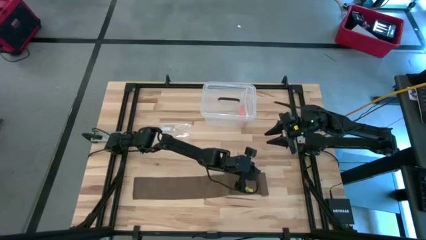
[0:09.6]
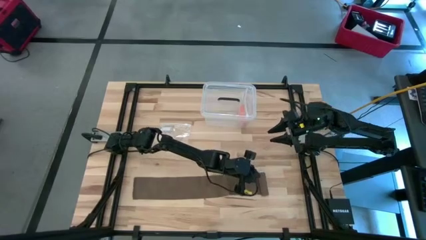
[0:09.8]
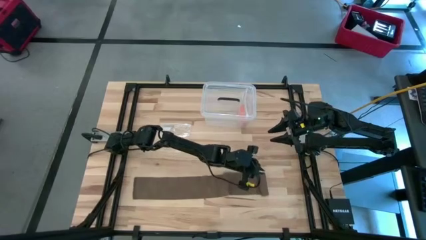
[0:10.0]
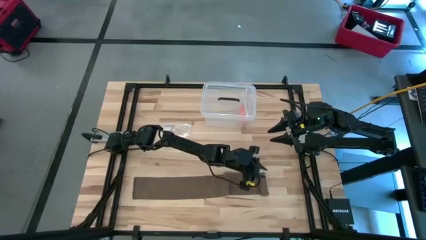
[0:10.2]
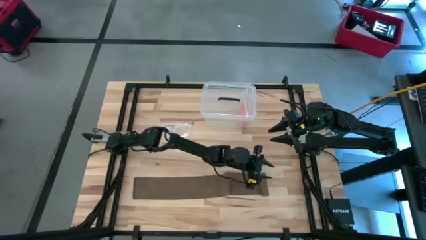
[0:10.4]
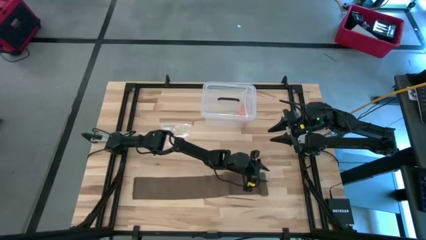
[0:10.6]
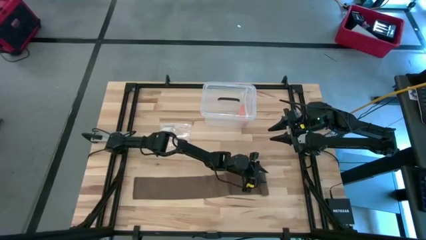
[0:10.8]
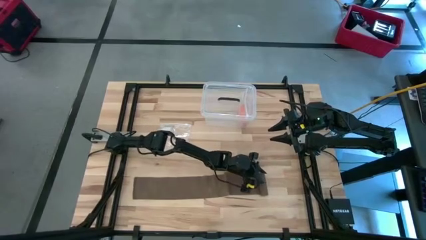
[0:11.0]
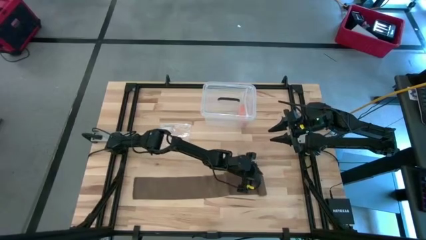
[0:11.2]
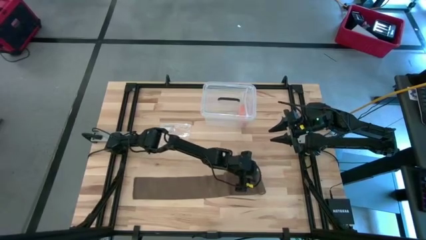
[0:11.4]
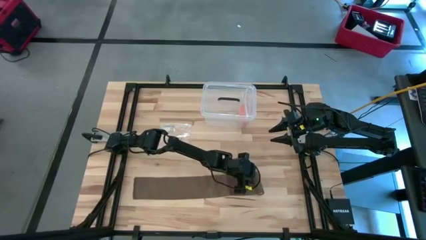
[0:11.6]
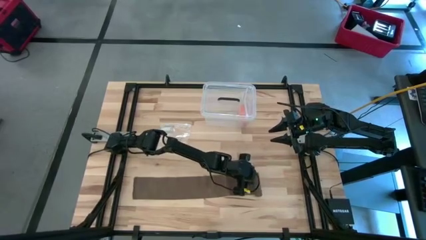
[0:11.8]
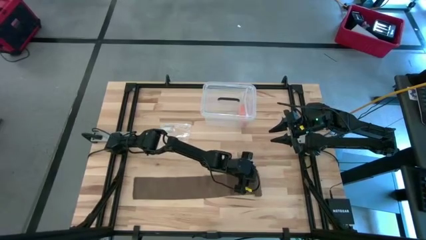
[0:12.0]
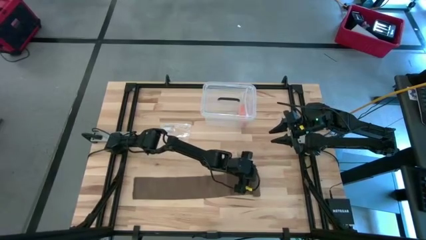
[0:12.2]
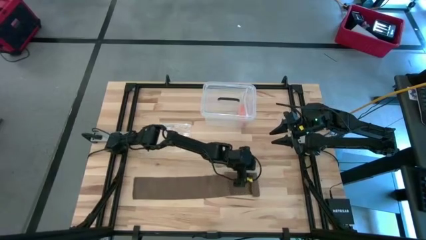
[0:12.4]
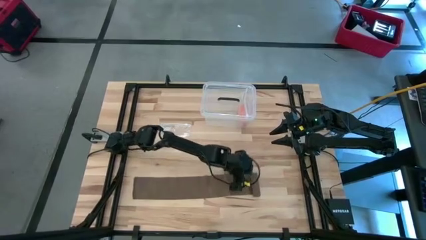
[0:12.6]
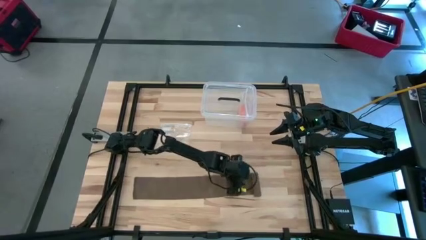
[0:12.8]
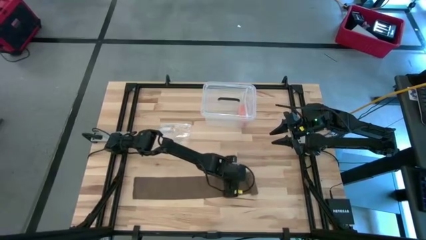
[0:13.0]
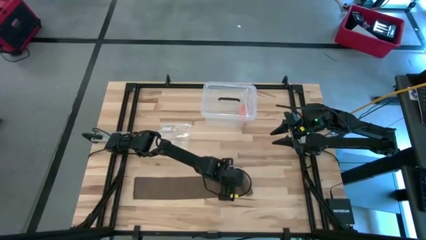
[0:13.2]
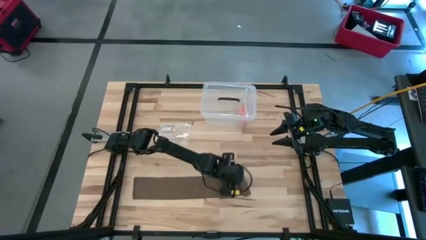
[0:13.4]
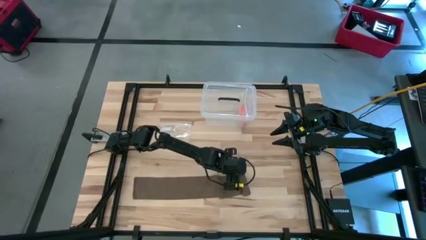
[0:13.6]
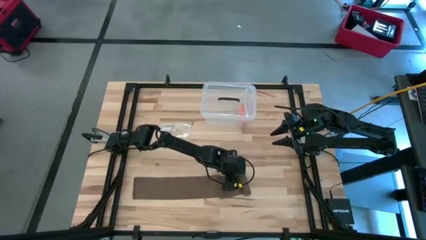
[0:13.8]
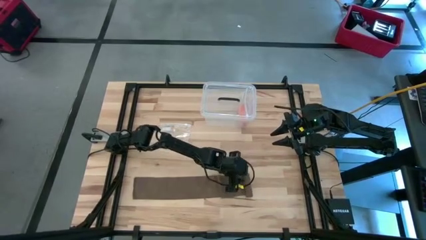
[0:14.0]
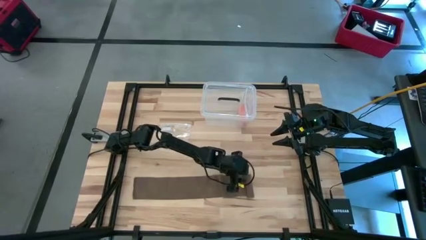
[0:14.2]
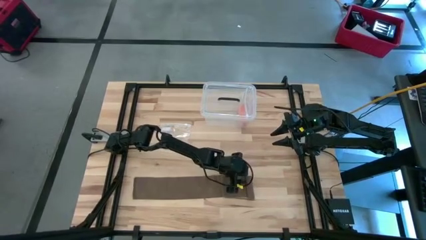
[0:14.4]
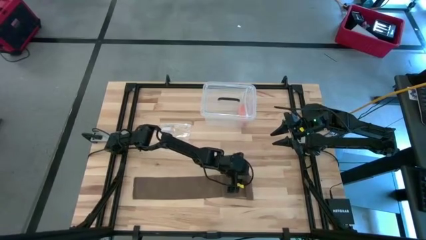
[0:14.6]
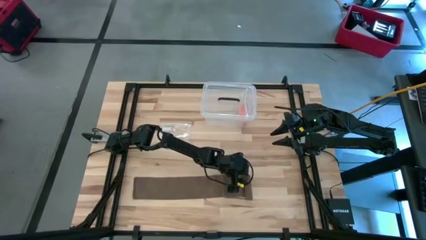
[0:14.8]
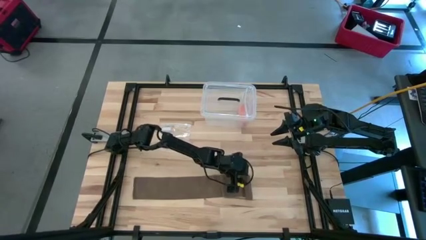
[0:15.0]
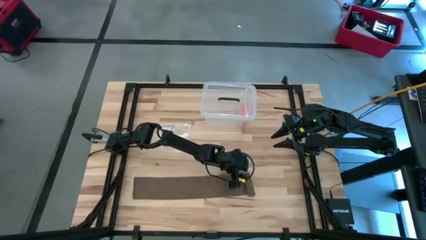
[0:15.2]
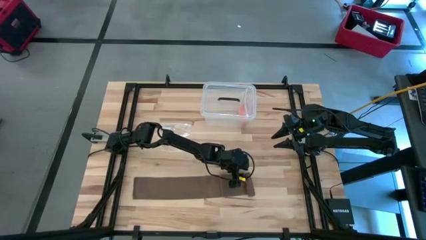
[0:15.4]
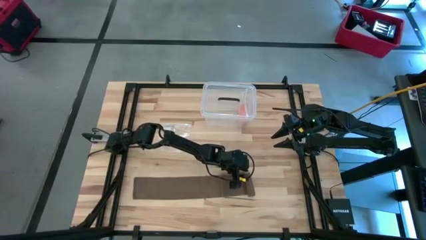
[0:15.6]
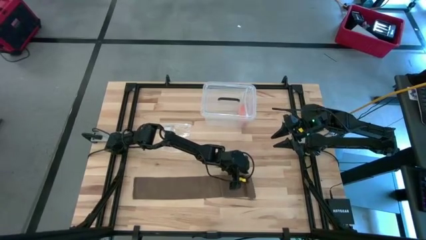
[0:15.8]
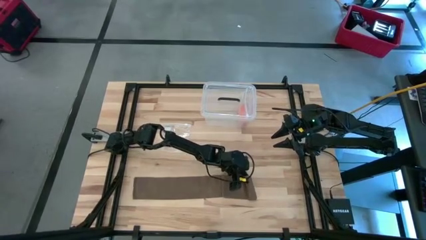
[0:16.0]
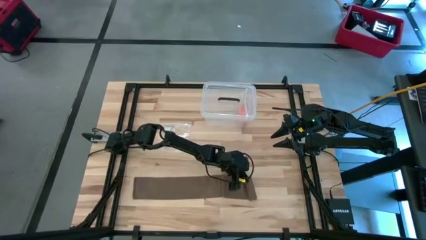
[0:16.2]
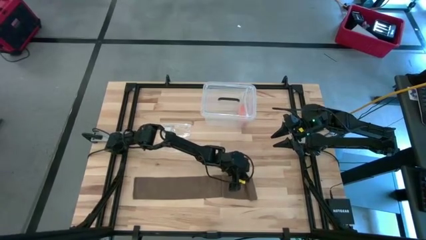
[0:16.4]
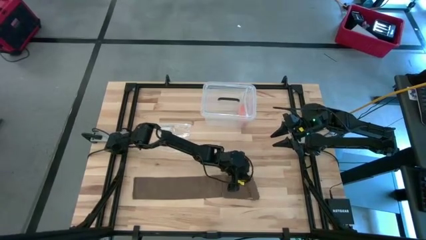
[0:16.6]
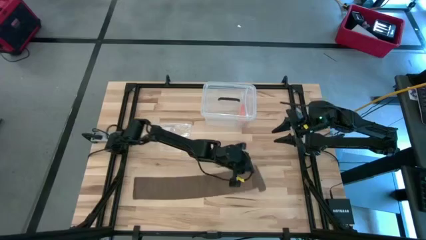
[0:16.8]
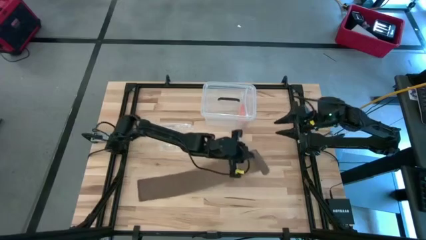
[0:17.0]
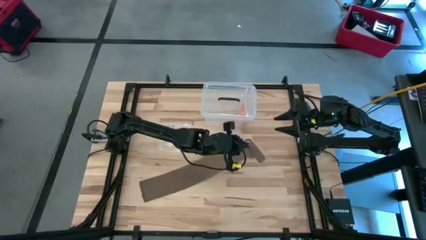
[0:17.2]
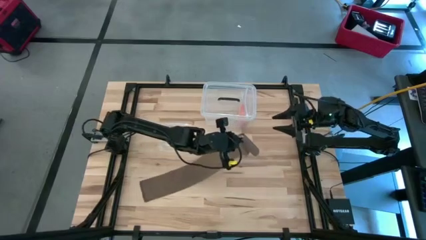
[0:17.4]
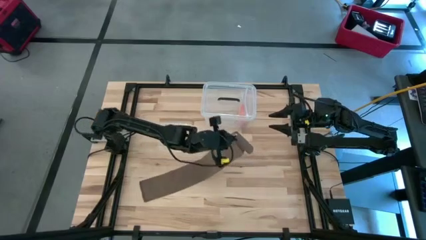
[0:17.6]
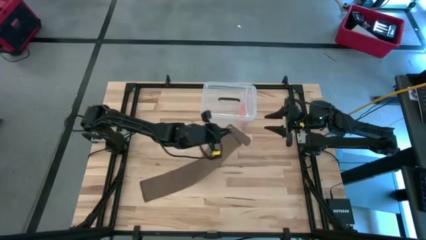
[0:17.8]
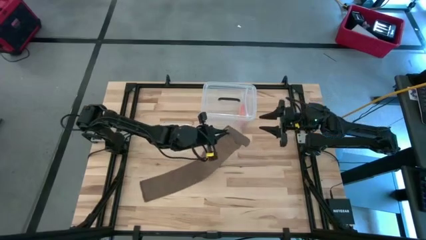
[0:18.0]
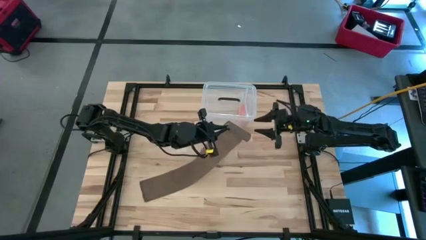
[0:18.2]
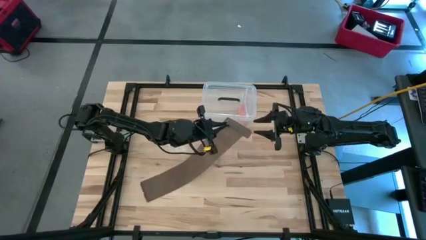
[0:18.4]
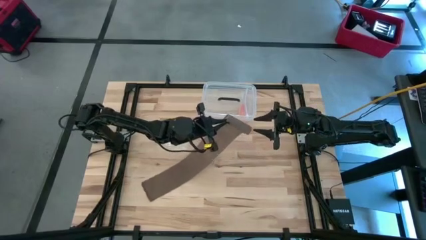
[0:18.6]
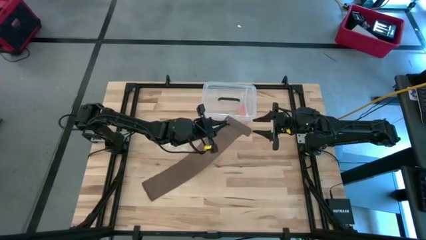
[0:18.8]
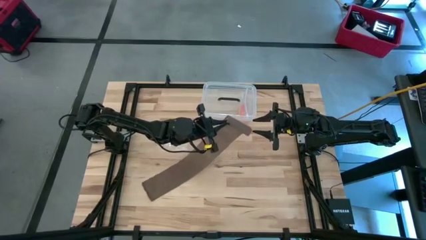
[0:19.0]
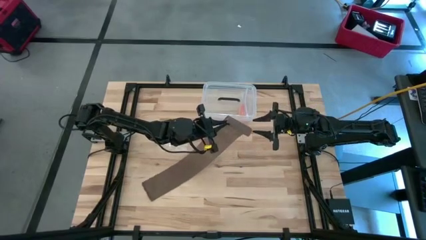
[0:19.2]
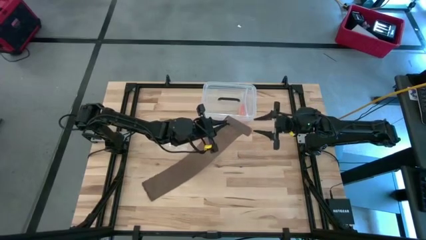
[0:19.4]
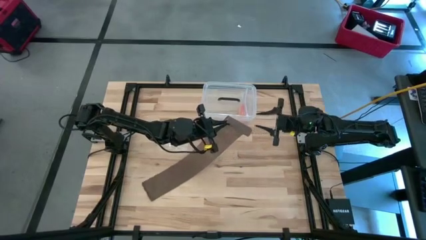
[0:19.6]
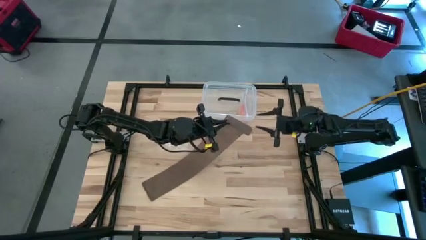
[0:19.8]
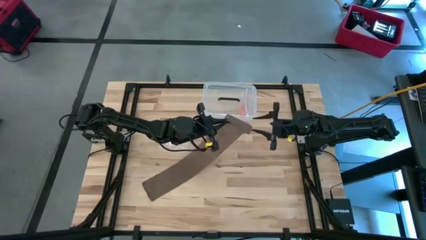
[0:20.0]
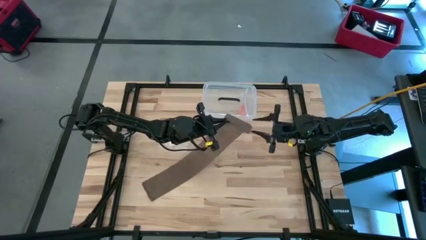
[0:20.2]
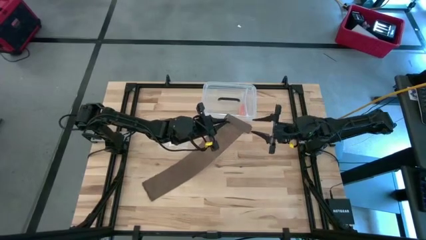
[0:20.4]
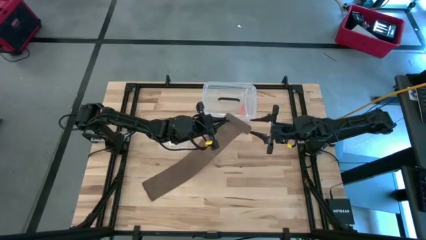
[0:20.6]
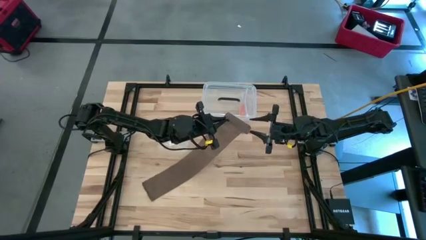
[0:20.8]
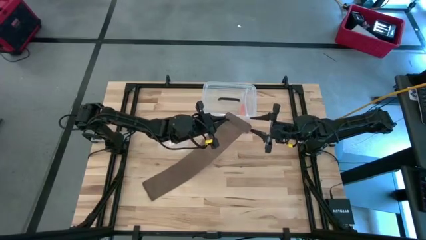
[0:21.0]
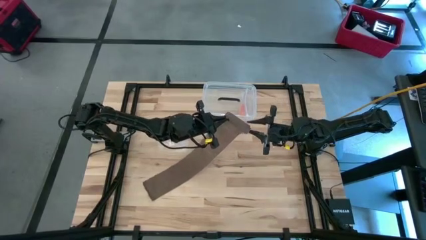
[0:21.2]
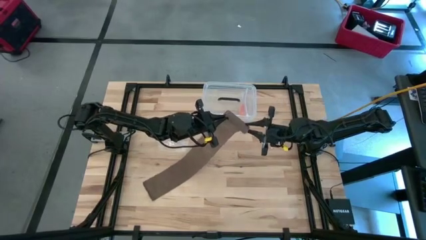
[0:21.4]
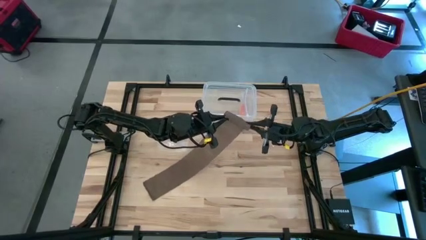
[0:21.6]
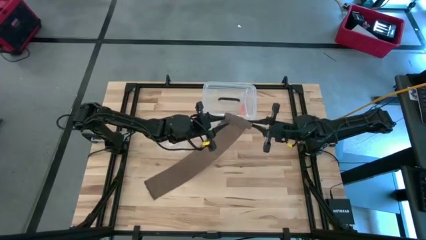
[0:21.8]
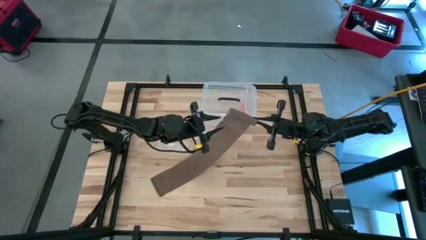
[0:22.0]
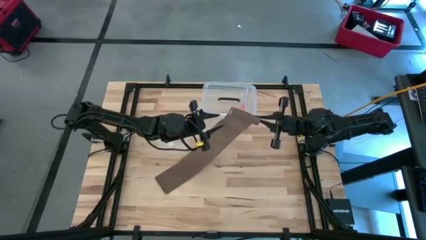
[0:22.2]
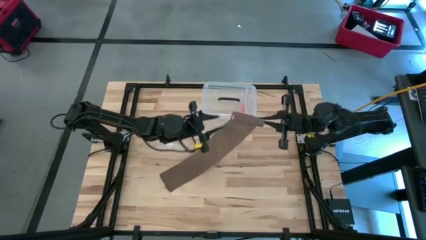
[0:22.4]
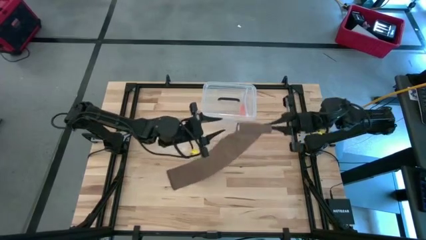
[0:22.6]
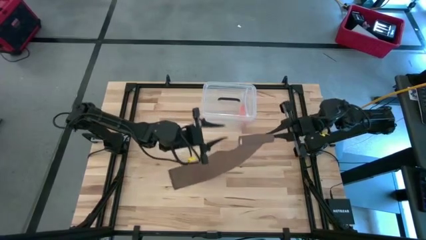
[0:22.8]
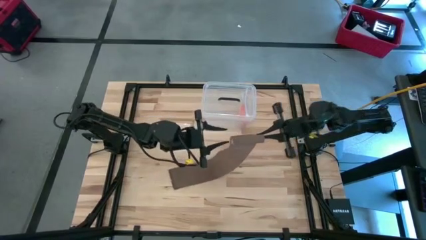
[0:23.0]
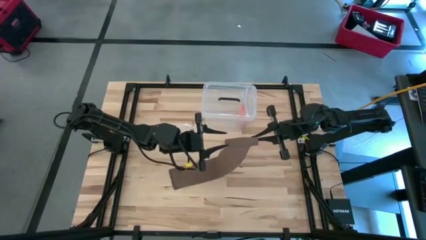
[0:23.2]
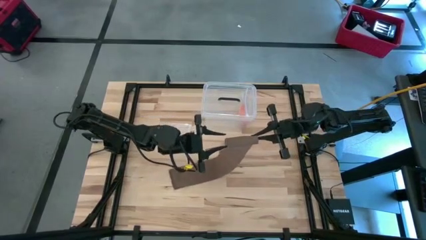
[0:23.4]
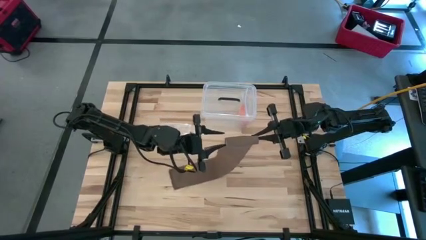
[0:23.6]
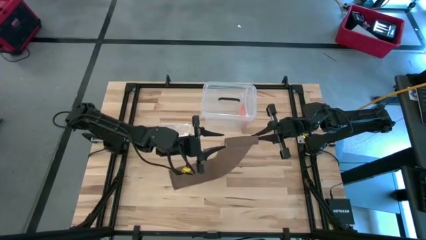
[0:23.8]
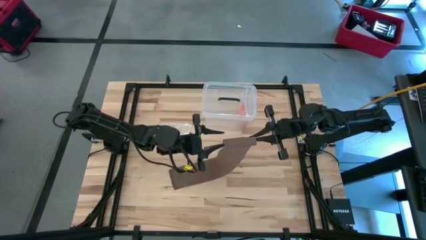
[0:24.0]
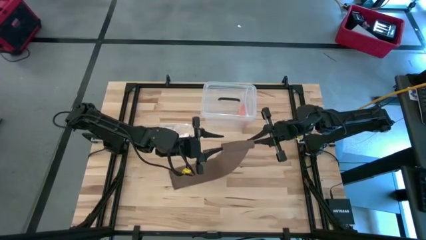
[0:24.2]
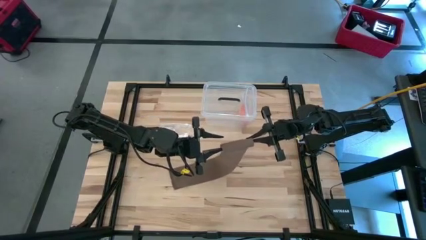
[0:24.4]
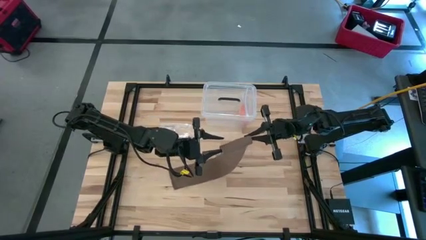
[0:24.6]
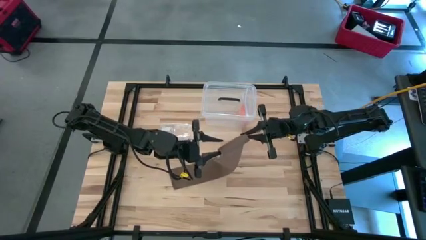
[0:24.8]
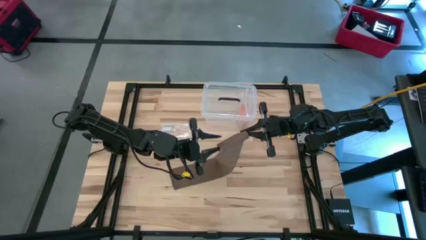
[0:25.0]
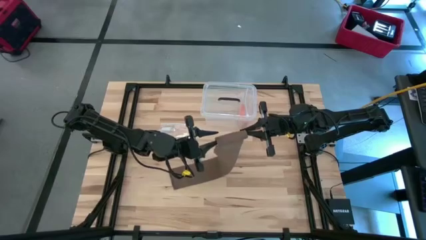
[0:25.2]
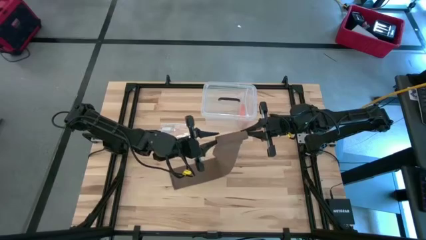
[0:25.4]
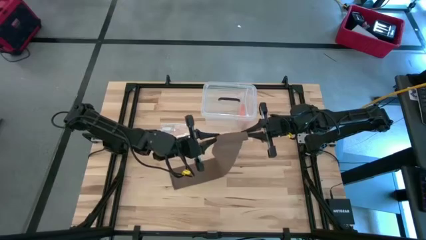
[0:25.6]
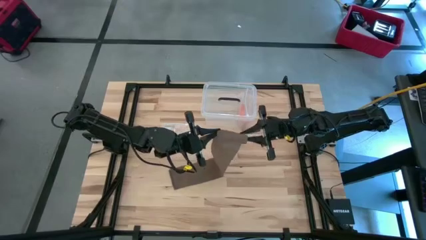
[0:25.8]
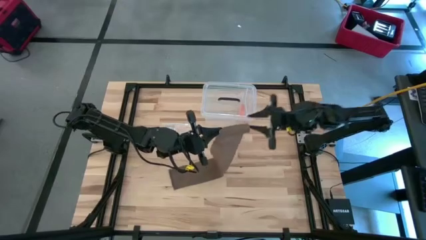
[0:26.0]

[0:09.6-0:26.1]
Task: Roll bandage
Roll the brown bandage
